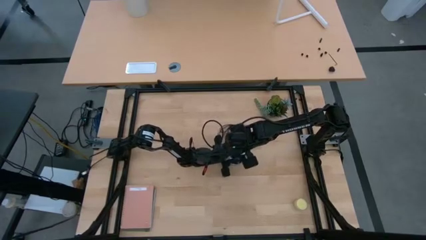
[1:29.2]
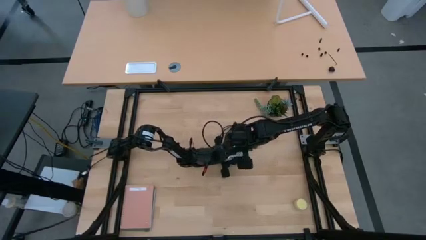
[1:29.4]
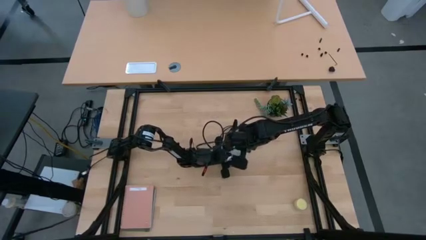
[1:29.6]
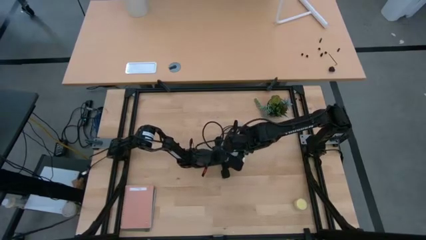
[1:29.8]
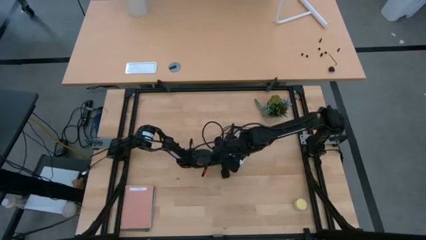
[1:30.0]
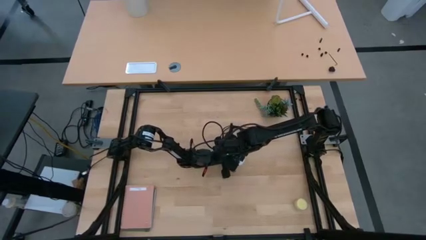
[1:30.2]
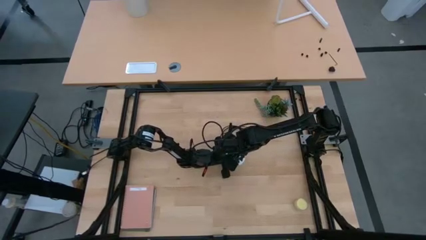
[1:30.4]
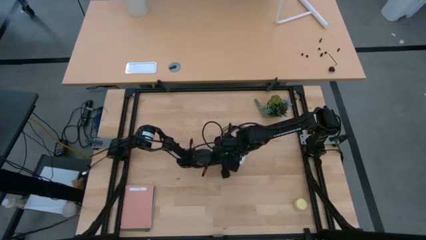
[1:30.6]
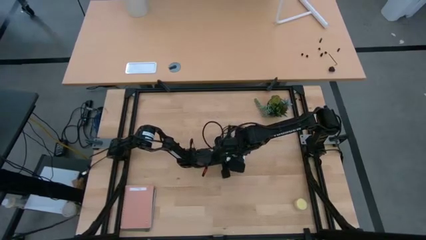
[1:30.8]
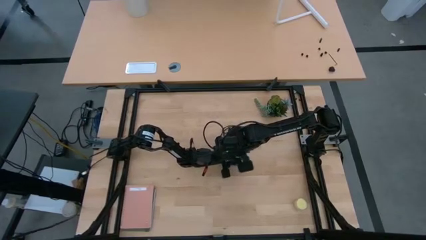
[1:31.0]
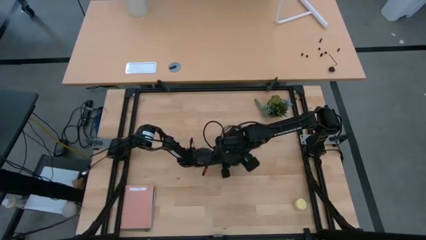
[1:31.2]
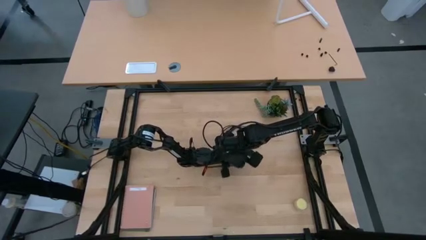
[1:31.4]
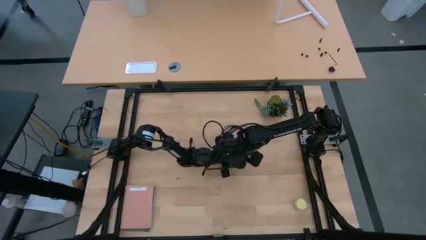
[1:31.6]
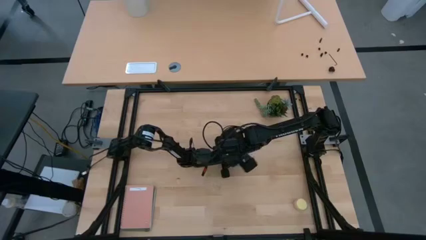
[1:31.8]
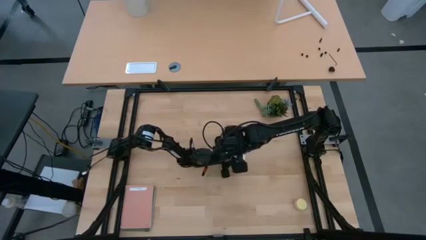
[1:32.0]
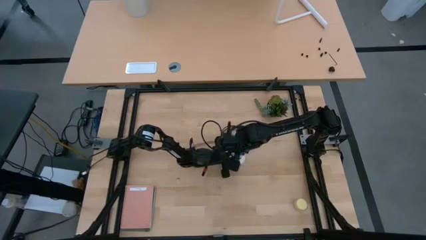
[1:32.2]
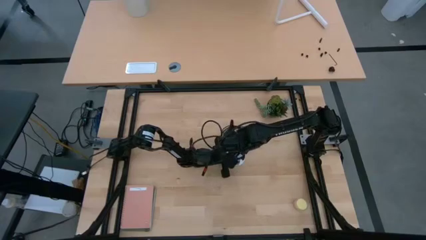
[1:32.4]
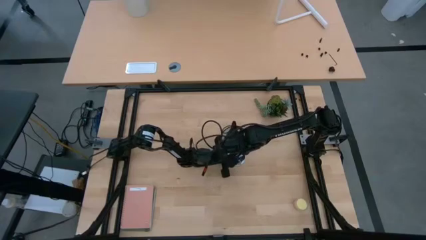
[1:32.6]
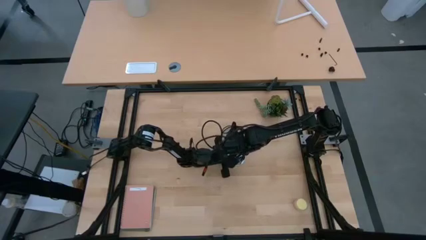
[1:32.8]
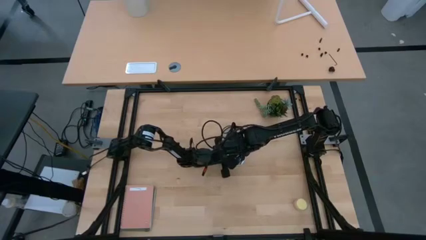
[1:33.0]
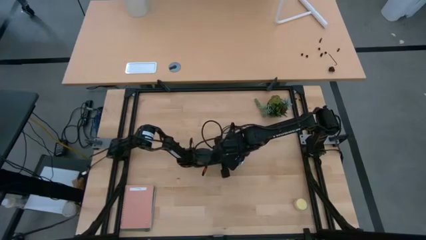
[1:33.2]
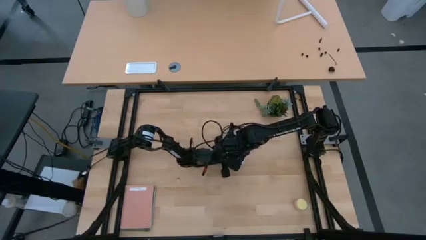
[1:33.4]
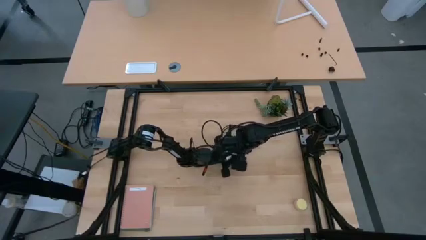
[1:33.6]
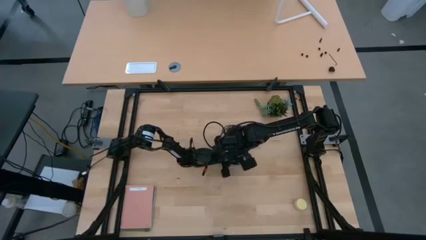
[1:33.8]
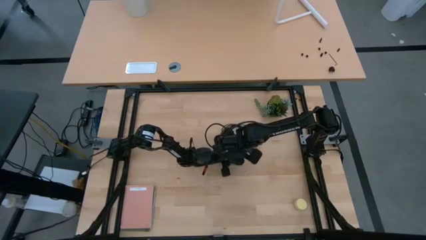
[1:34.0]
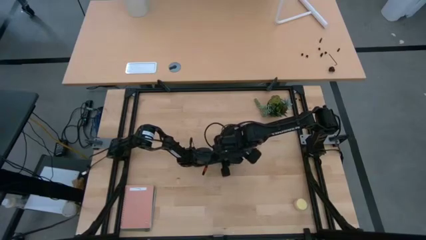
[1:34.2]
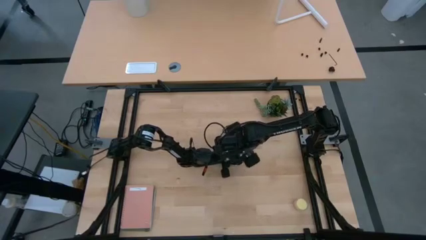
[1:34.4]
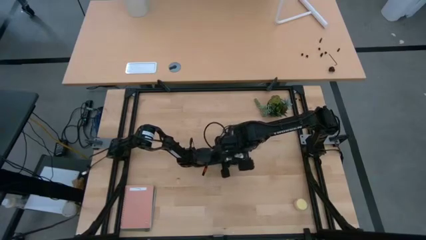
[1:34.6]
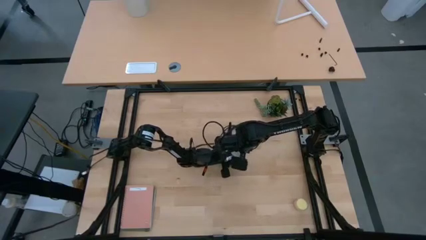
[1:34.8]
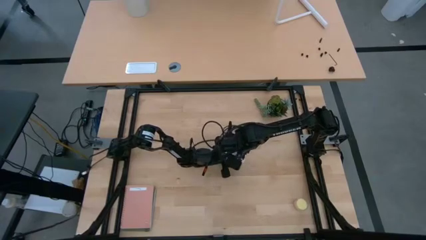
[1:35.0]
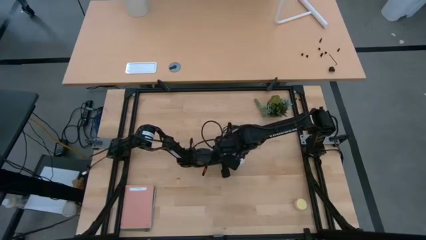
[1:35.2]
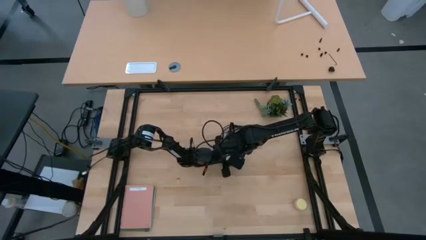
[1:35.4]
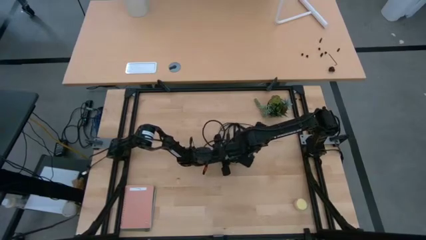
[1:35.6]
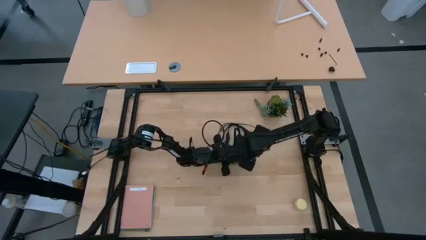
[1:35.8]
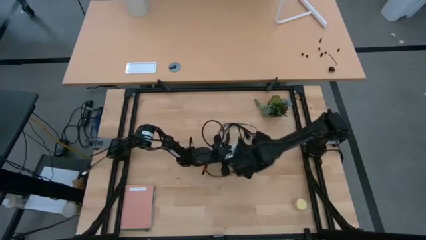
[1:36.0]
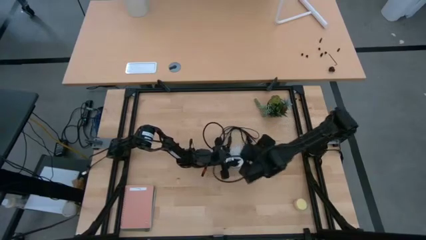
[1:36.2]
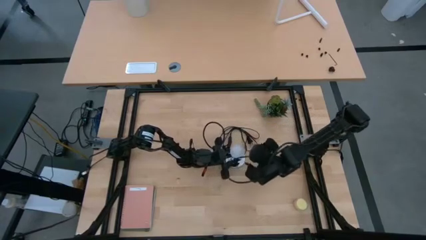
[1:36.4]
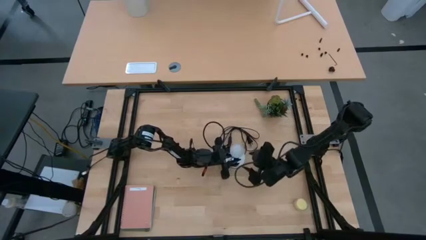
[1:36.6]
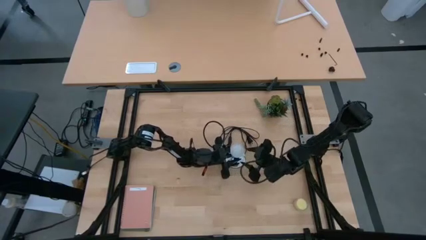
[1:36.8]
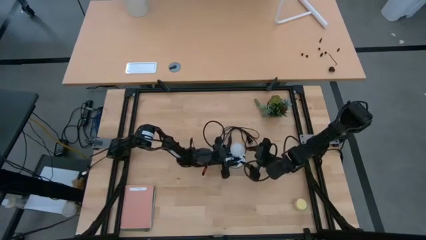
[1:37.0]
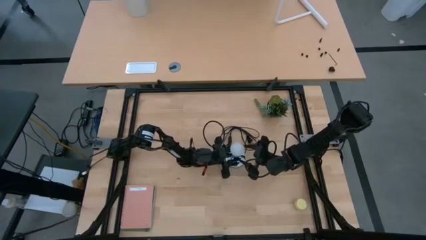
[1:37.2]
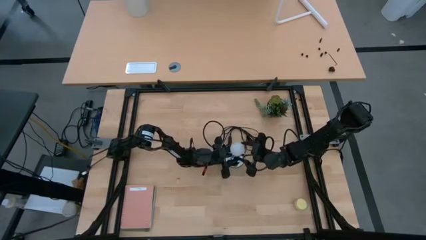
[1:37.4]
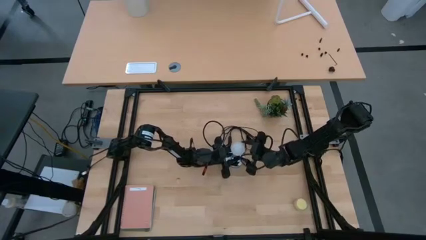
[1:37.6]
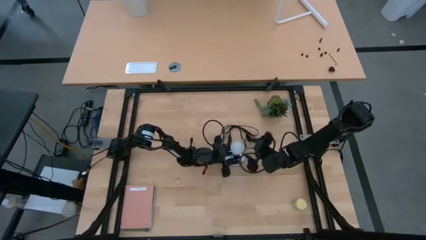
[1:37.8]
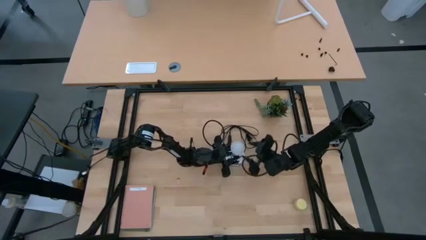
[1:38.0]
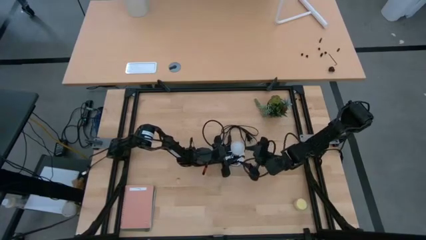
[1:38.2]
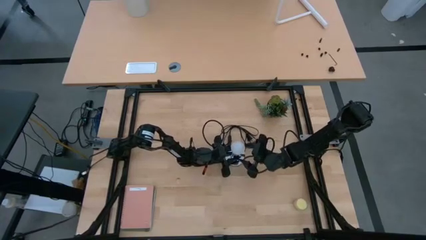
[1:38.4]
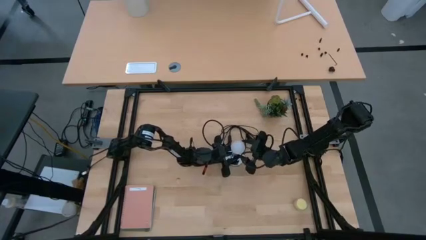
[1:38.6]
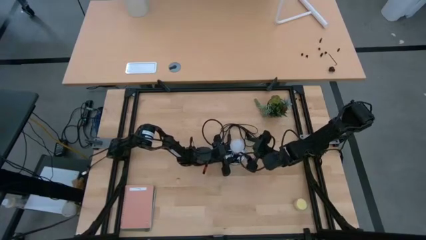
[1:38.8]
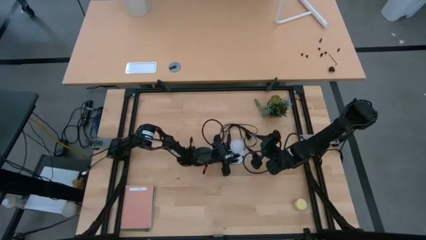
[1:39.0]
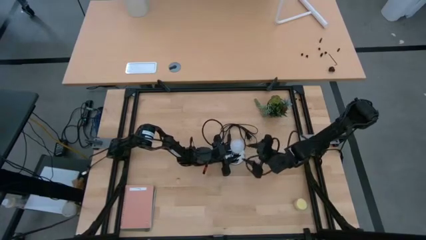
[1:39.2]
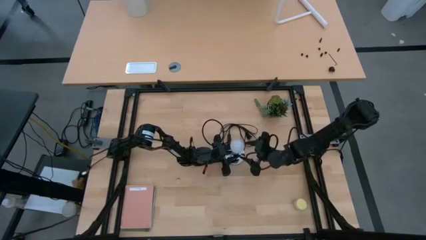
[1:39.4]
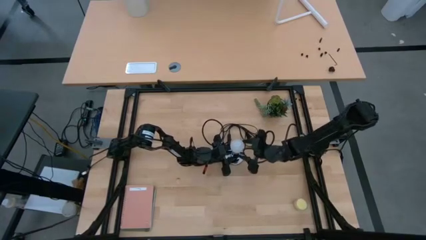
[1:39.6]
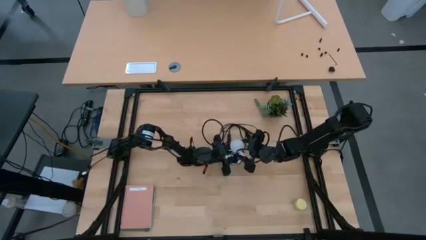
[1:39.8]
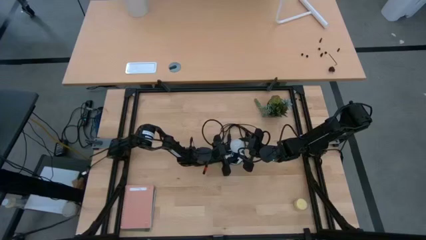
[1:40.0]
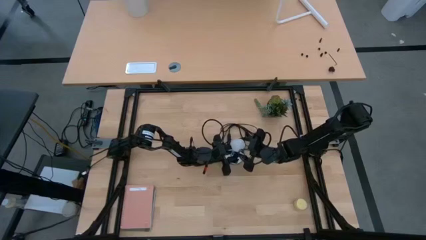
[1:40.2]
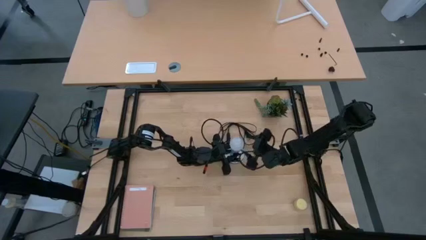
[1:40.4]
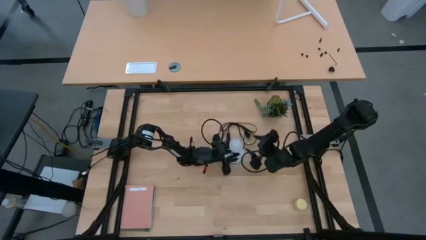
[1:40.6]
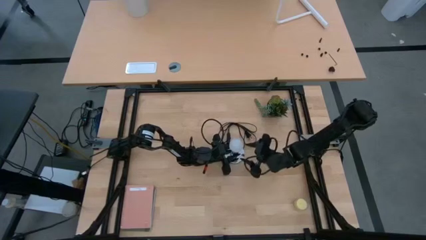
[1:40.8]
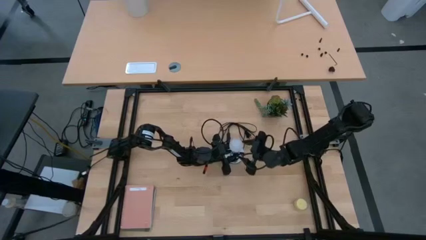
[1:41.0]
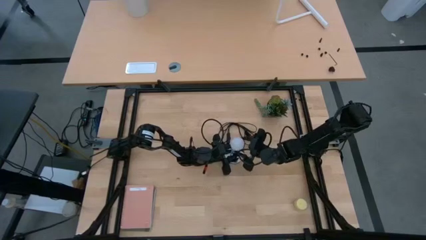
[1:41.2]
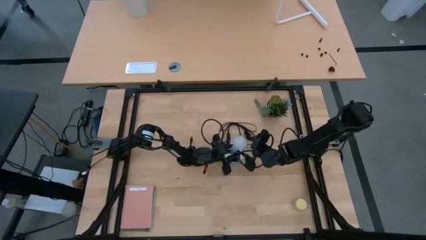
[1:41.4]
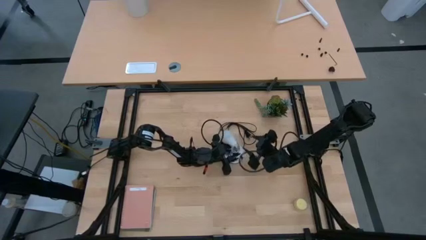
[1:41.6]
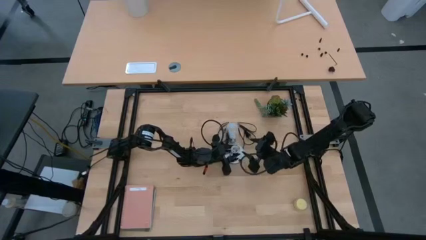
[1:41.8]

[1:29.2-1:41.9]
Task: Screw lightbulb
Remove the lightbulb from the silver lamp
